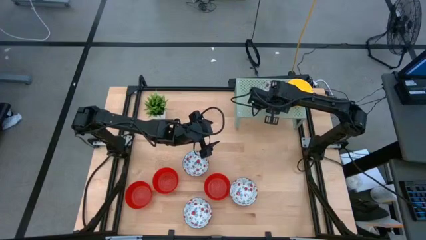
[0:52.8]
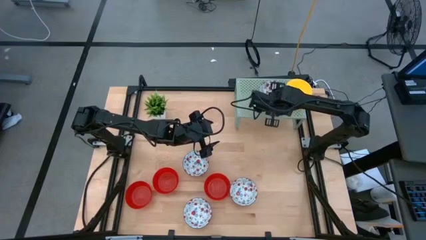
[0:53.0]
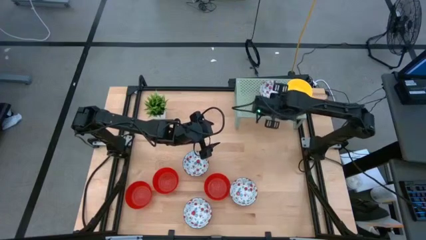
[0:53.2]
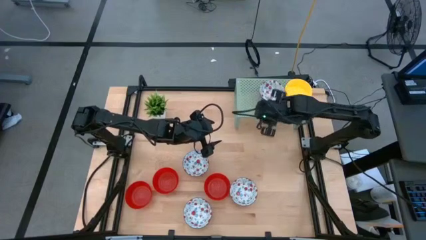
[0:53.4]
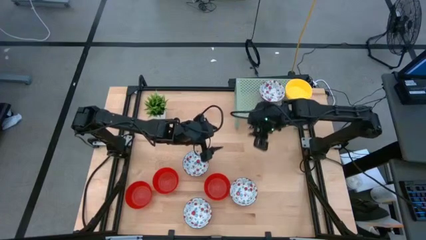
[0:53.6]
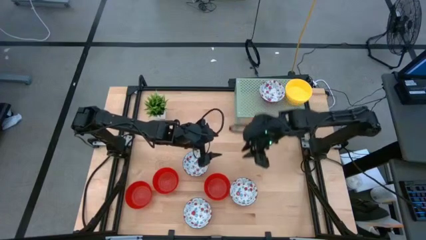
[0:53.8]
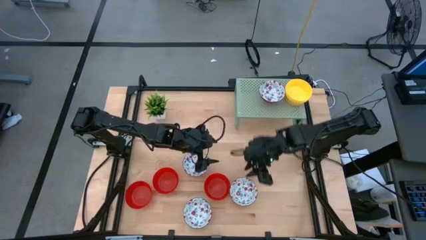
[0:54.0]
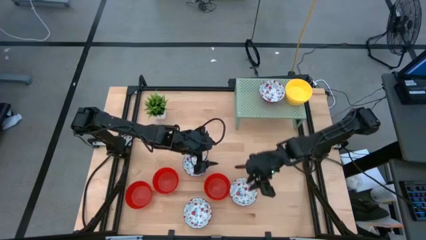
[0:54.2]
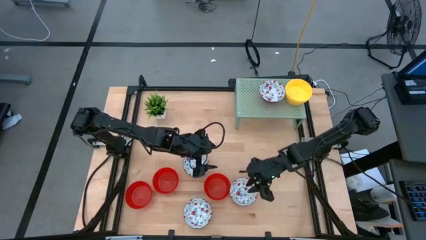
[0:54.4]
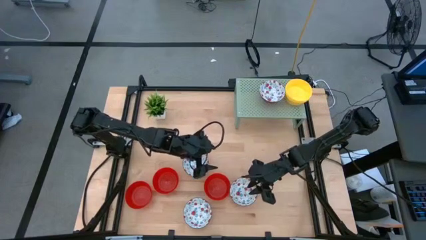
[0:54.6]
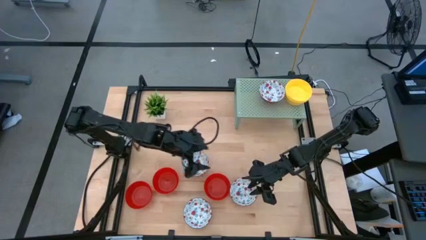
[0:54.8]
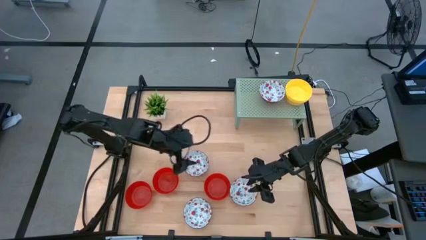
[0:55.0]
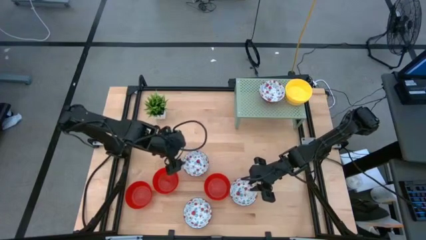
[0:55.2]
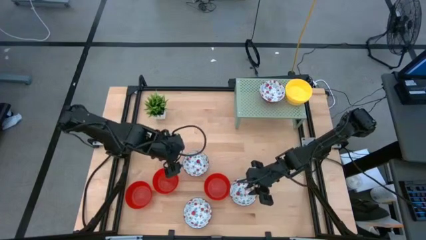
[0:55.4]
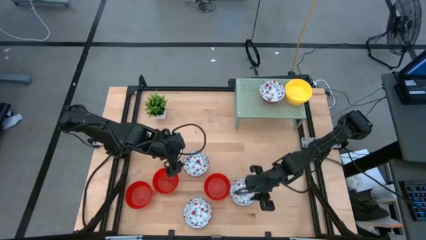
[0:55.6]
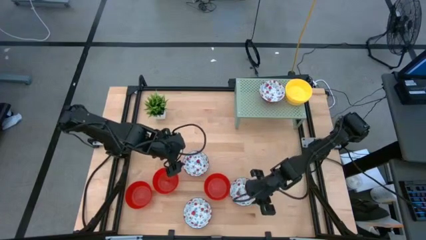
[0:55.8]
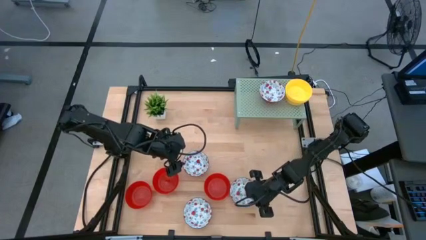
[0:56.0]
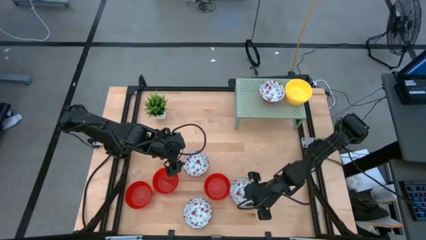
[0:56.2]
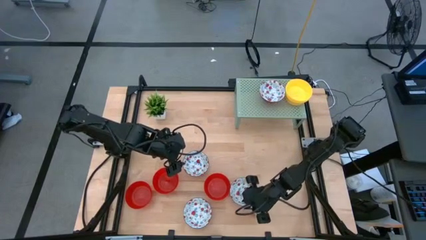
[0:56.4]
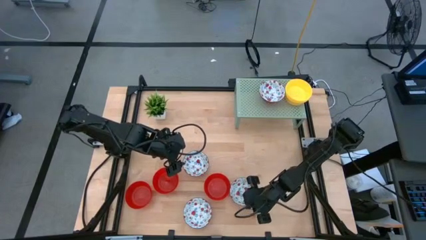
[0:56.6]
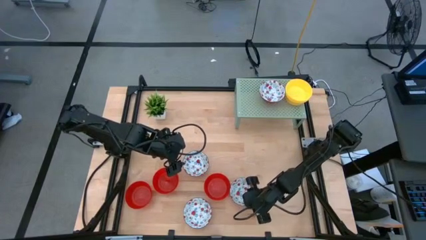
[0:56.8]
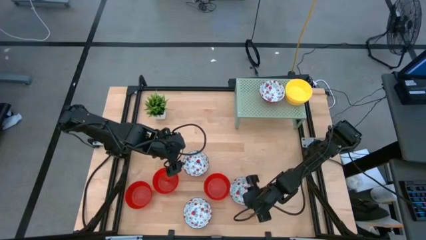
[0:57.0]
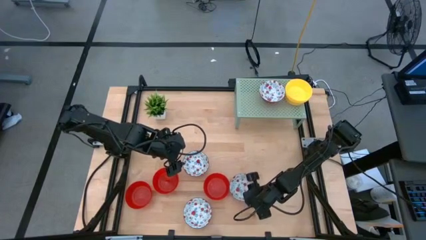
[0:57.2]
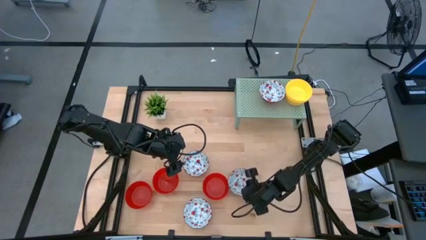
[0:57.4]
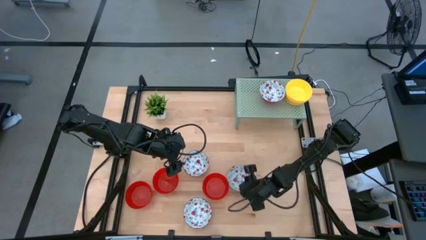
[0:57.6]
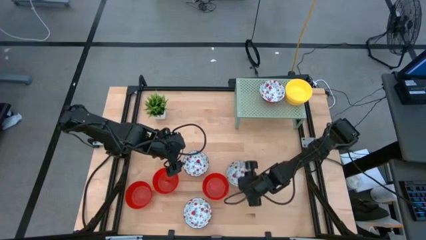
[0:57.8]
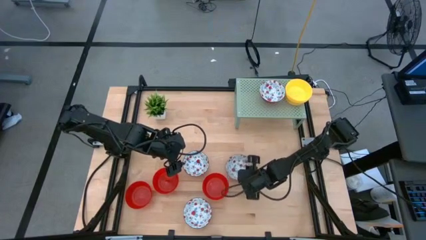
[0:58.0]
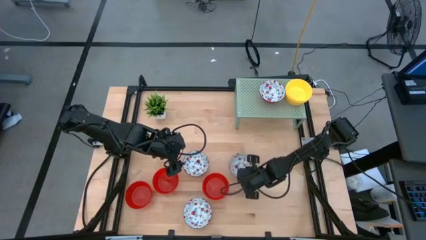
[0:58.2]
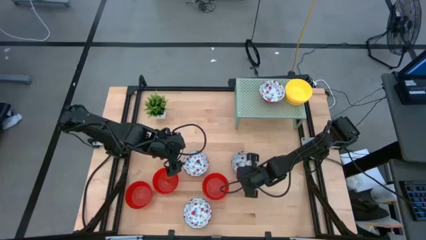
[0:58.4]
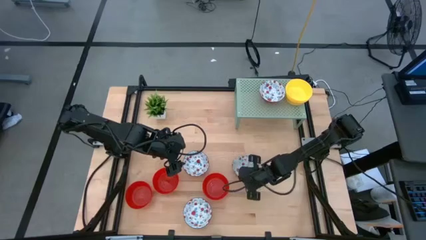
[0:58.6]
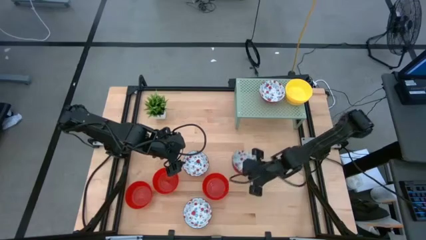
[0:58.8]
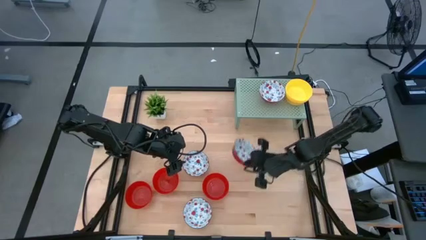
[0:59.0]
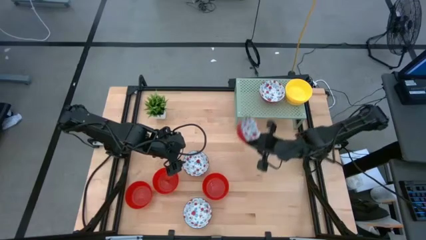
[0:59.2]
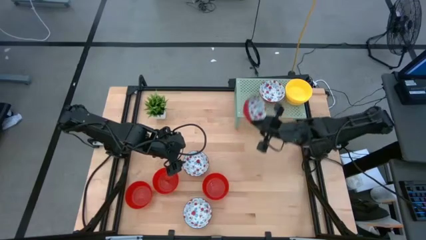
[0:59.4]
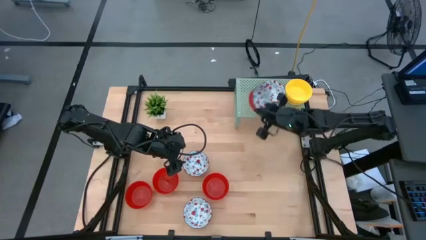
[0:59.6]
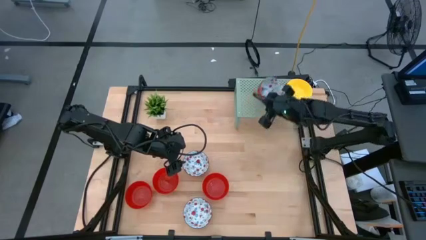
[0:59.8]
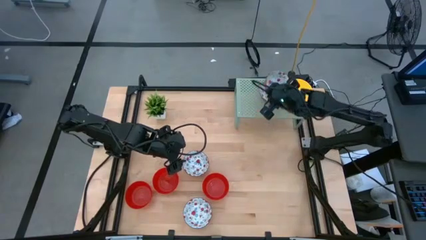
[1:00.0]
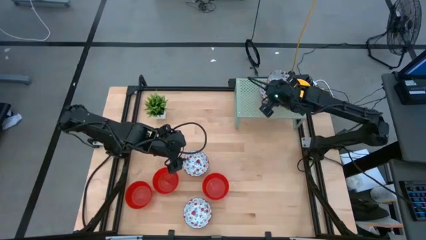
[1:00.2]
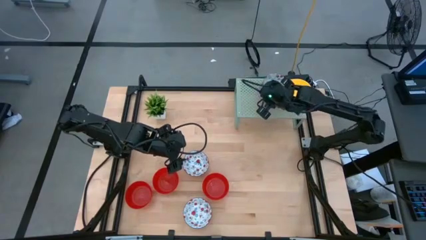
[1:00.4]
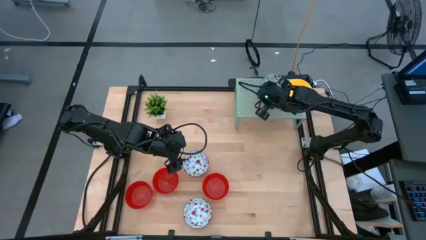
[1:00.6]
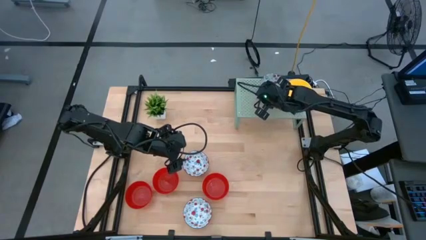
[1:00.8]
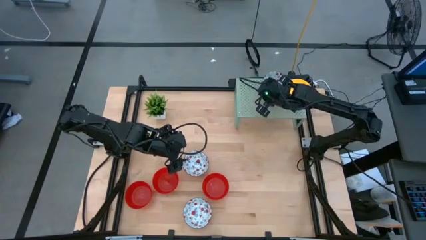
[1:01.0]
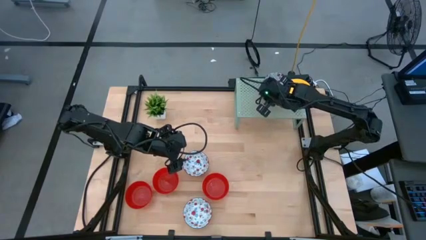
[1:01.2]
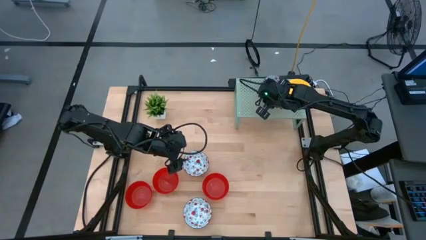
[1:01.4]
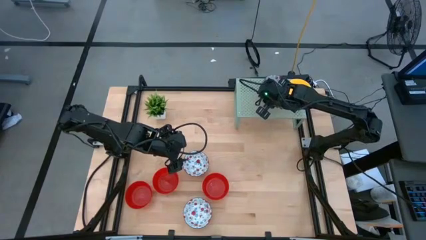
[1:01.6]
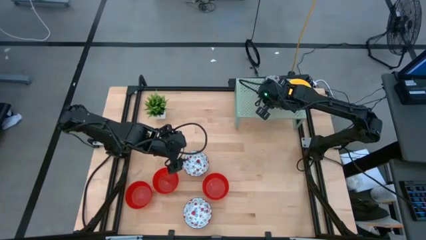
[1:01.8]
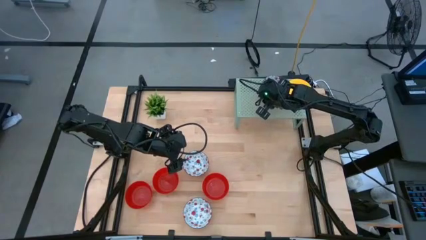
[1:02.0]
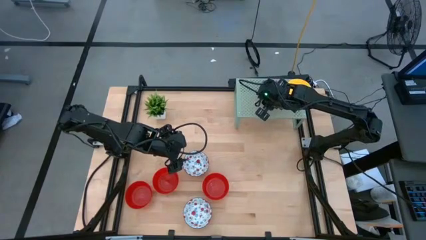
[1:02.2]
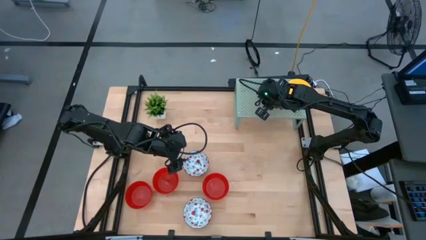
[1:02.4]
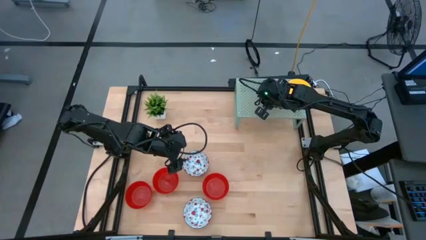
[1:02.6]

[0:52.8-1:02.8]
Task: Pick & Place Mini bowls
Stack the white pattern bowl on the white pattern bowl on the shelf

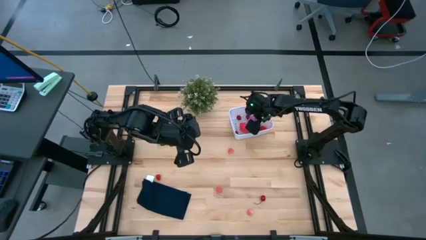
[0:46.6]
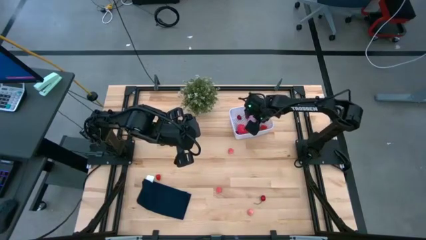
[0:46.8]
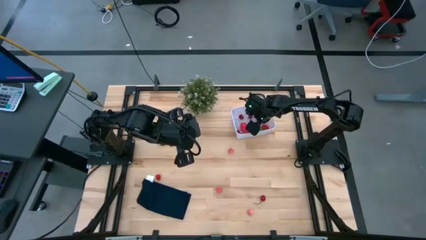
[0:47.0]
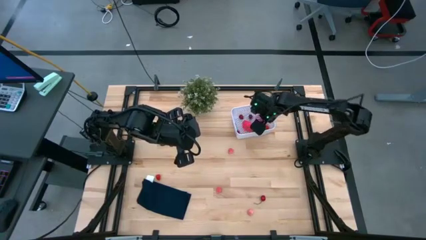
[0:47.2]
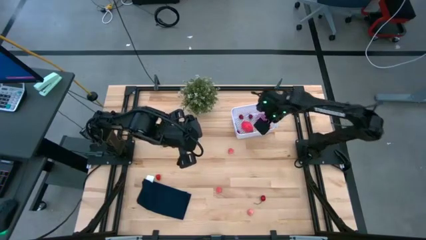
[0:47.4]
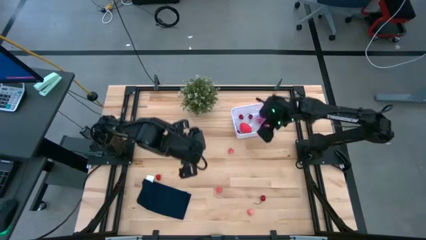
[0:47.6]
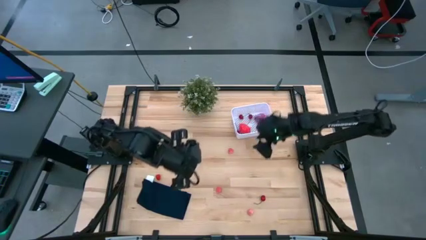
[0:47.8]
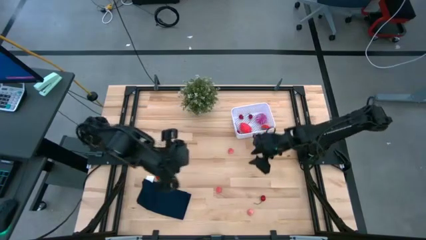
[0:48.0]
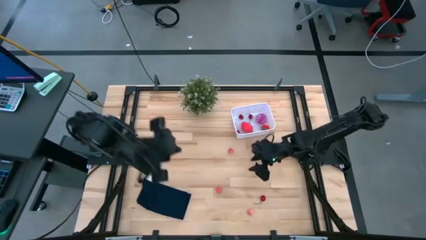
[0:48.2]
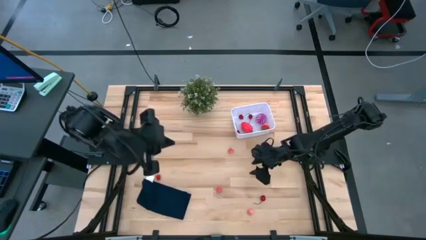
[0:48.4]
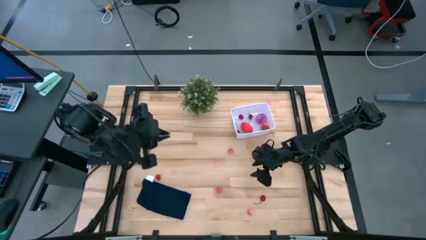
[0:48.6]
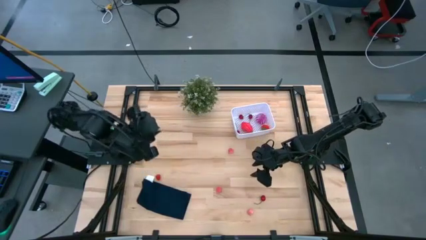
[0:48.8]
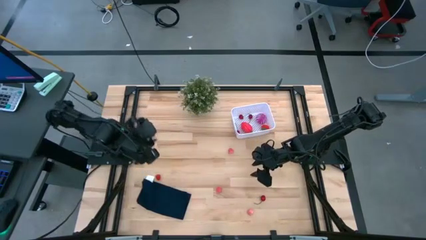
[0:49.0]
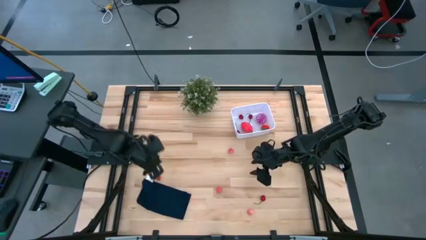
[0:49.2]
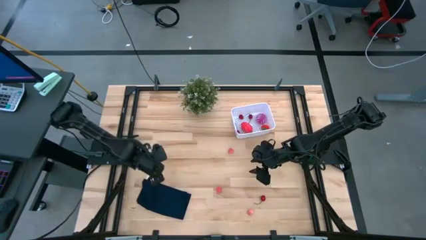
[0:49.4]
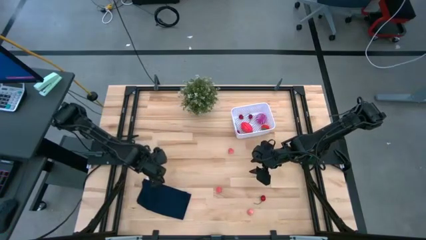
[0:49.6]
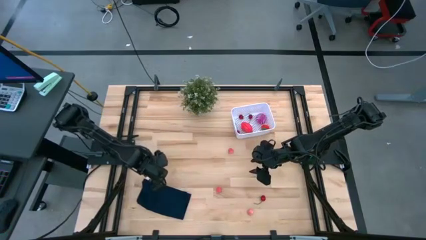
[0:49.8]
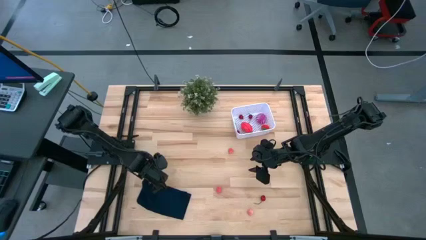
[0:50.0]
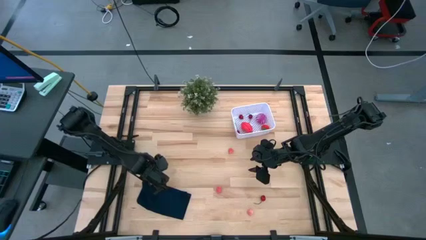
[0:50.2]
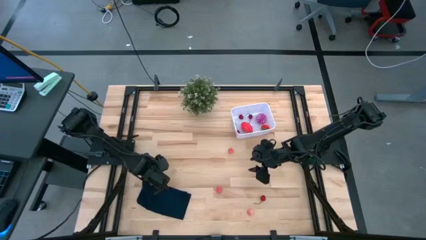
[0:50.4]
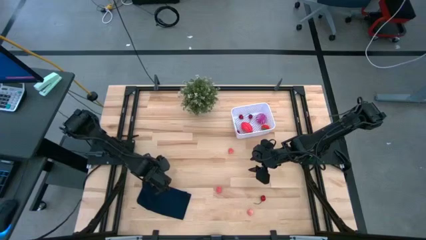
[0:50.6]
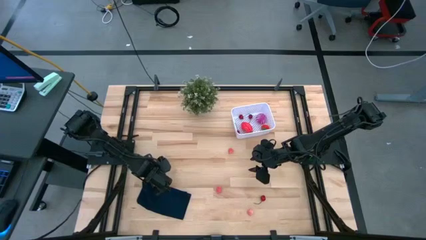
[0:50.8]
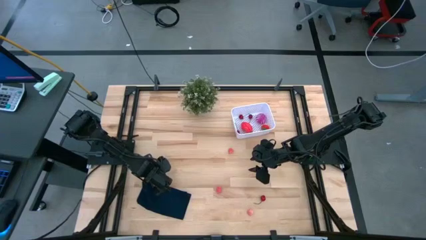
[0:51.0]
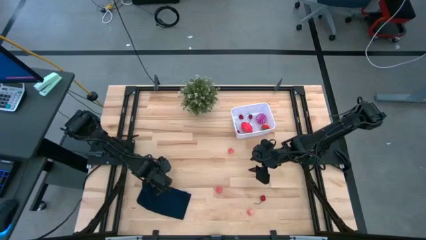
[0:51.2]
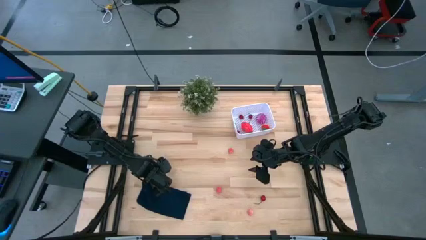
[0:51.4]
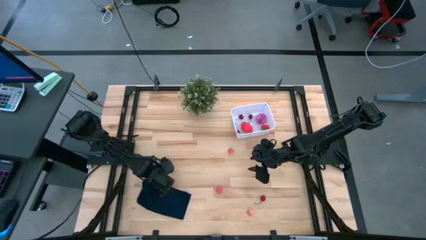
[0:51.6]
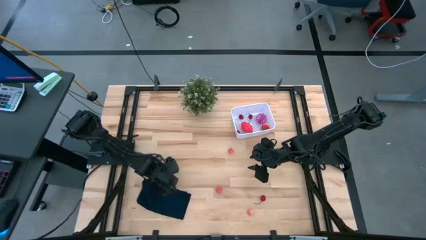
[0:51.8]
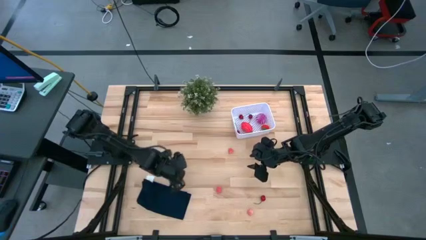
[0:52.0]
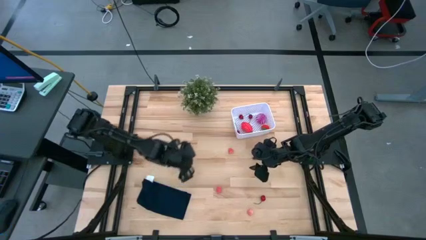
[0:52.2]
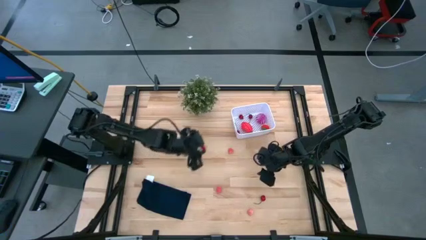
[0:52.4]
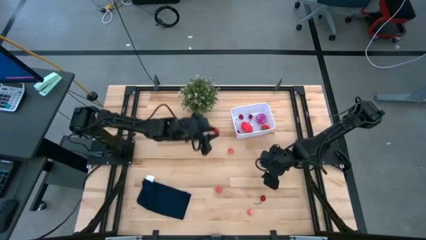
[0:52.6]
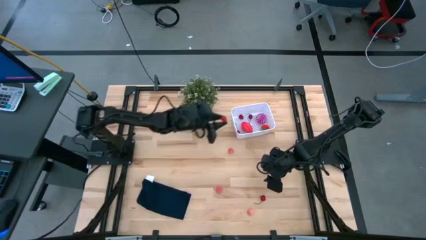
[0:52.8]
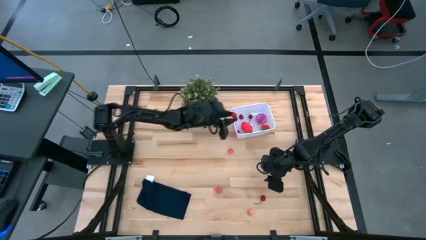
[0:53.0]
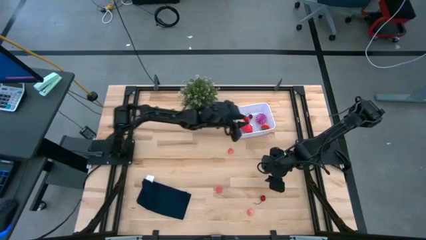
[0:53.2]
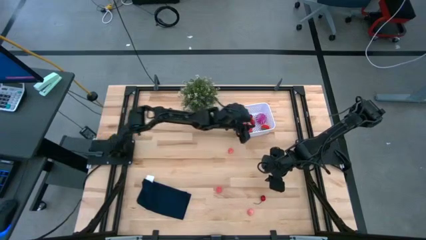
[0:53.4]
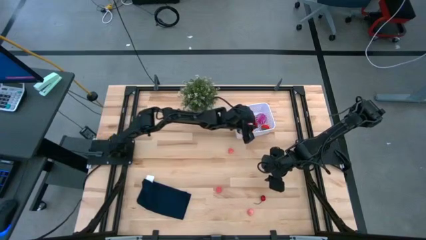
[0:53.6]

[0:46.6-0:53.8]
Task: Pick and placing Produce into tupperware
Put the raspberry into the bin

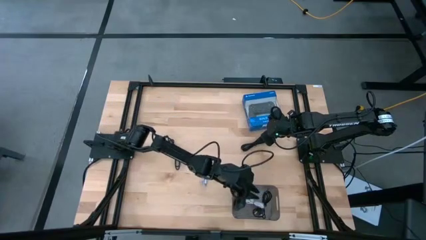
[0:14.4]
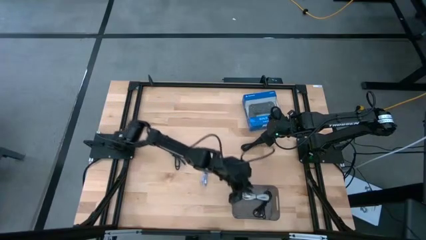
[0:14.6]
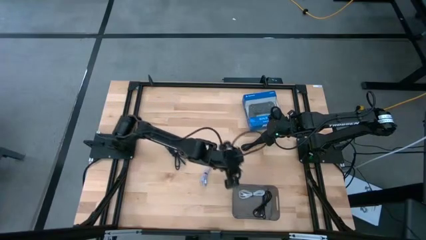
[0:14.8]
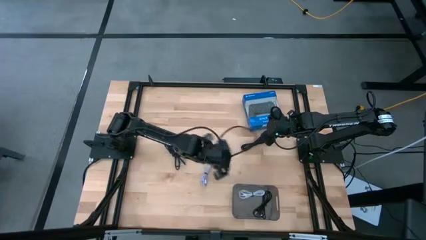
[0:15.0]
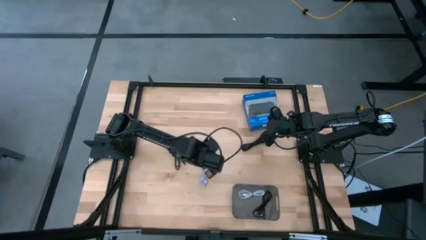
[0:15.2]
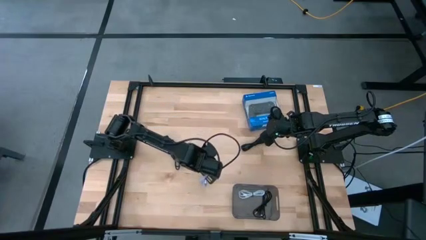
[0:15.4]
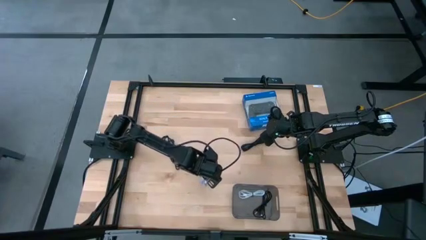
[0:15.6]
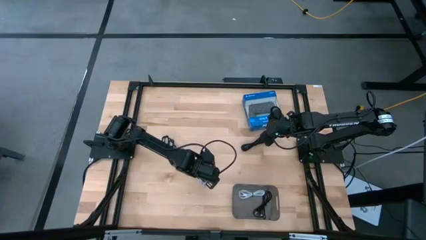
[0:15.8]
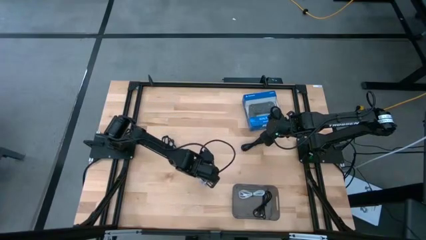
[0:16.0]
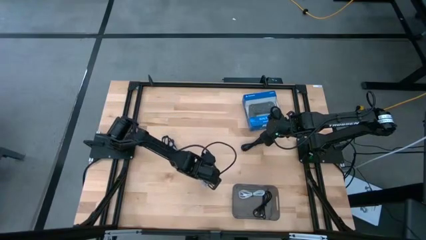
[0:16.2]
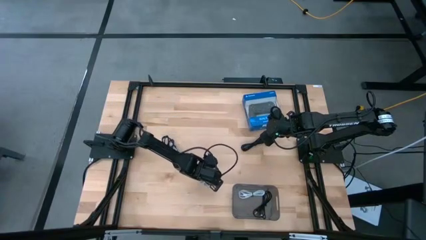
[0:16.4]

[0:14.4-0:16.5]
Task: Pick and place USB-C Cables
Put the white charger cable into the black bin
